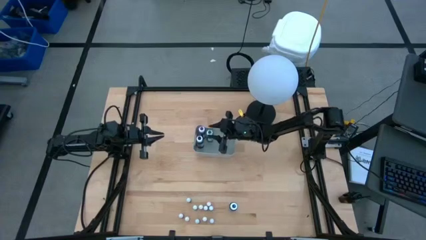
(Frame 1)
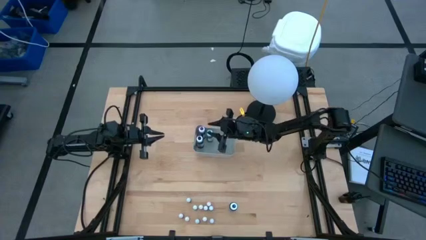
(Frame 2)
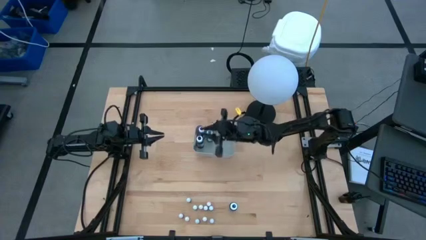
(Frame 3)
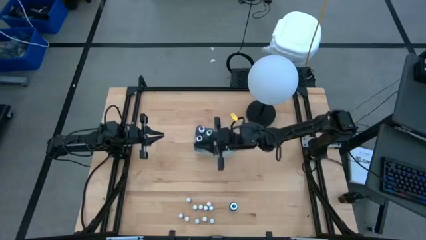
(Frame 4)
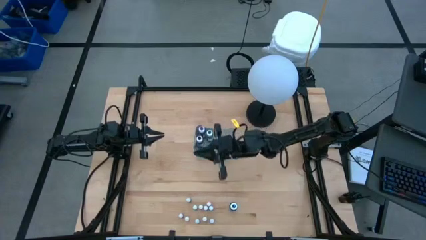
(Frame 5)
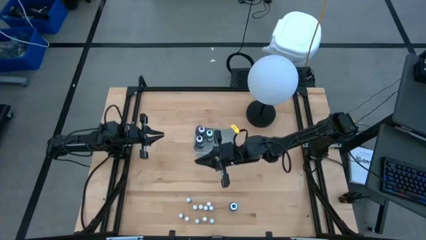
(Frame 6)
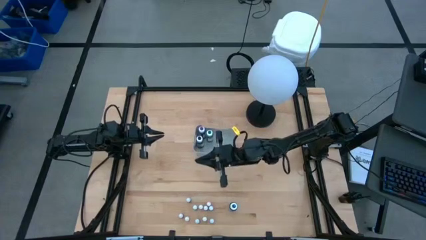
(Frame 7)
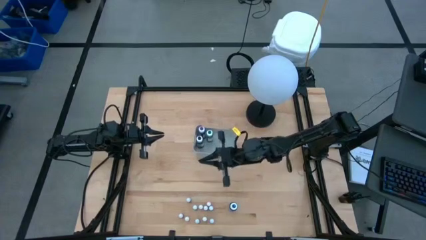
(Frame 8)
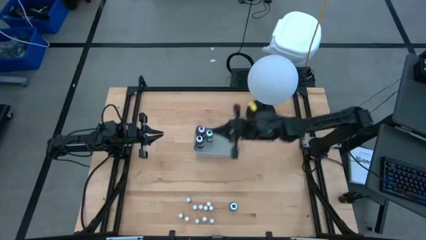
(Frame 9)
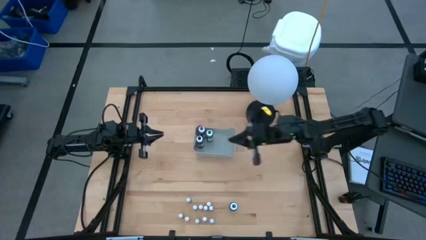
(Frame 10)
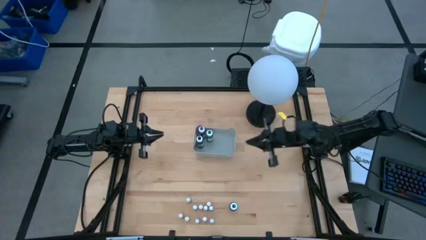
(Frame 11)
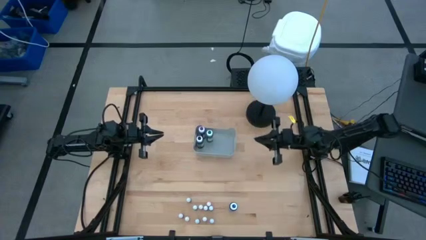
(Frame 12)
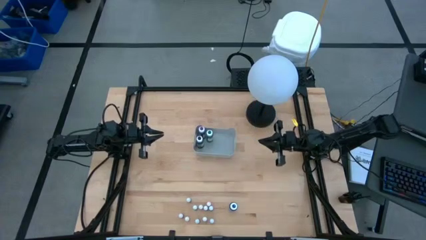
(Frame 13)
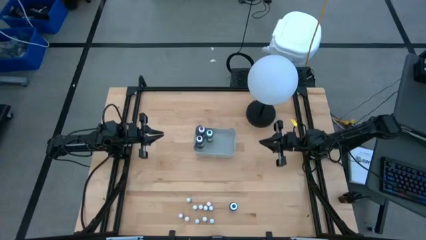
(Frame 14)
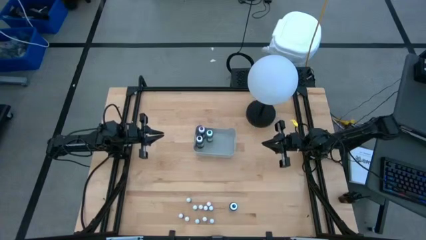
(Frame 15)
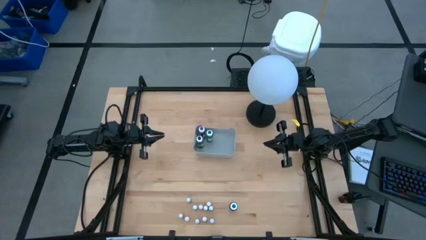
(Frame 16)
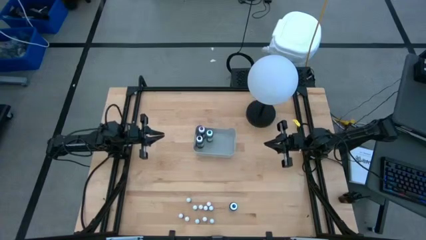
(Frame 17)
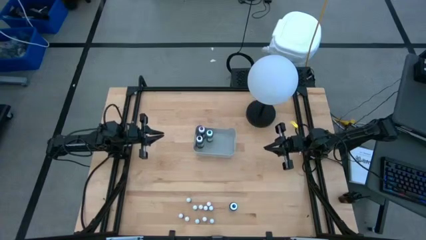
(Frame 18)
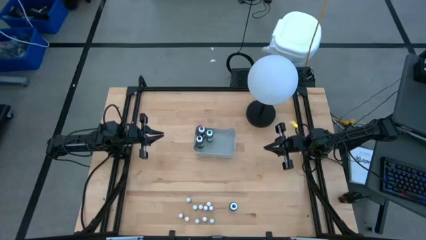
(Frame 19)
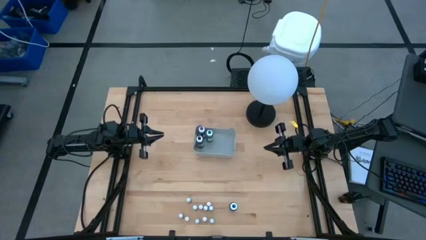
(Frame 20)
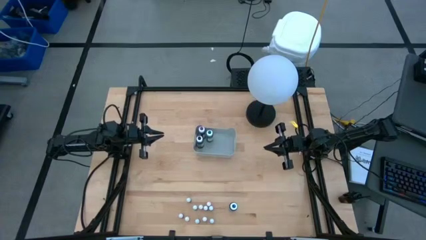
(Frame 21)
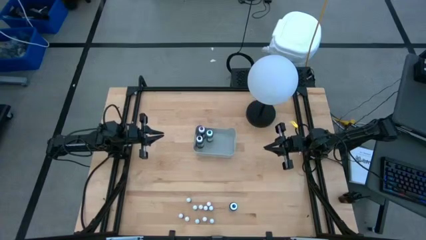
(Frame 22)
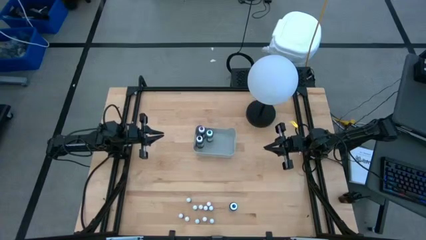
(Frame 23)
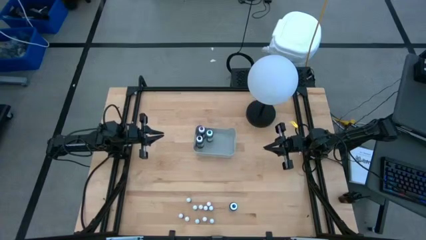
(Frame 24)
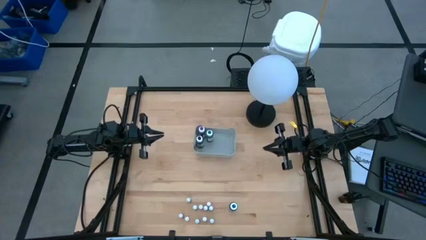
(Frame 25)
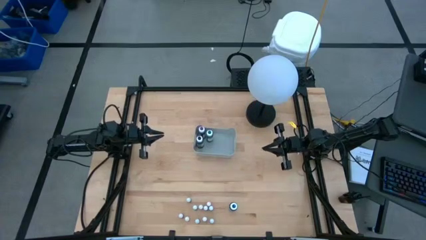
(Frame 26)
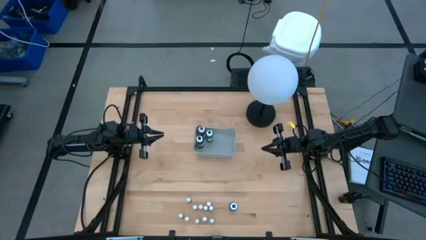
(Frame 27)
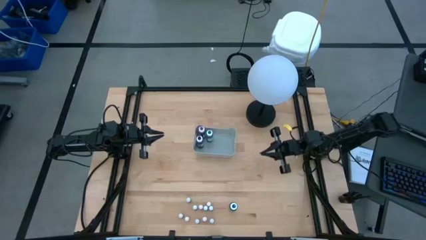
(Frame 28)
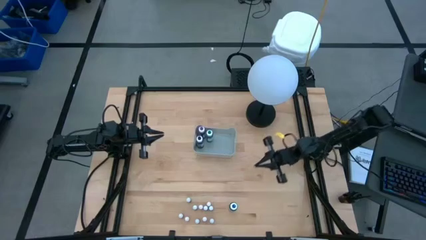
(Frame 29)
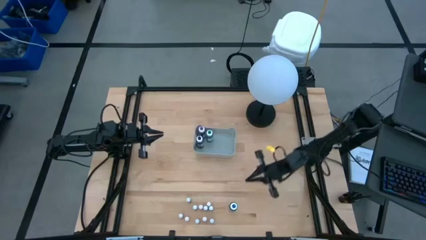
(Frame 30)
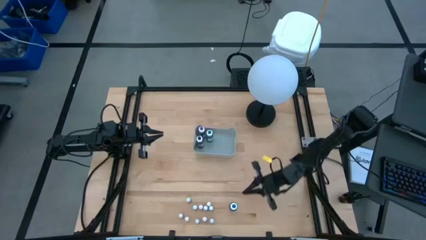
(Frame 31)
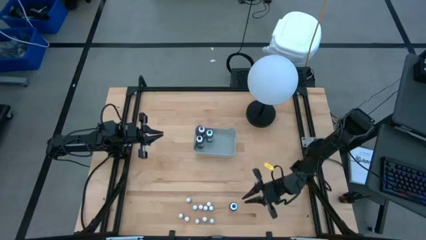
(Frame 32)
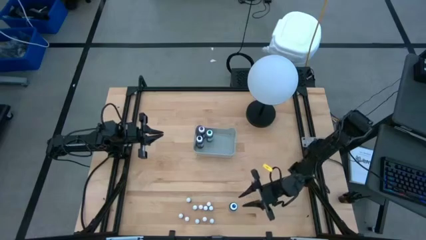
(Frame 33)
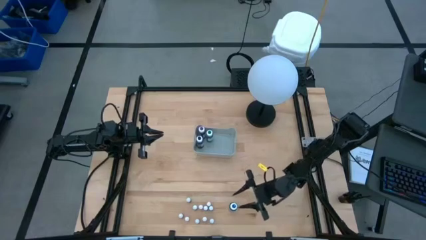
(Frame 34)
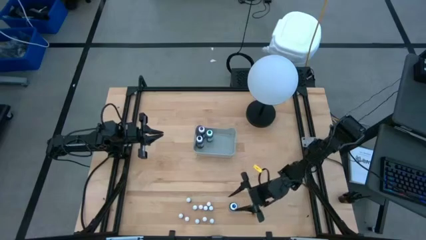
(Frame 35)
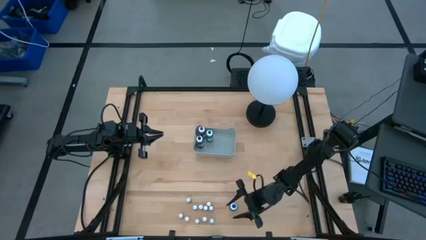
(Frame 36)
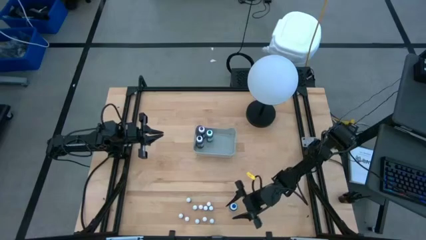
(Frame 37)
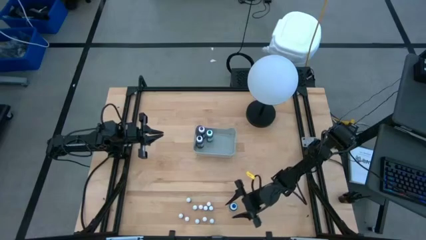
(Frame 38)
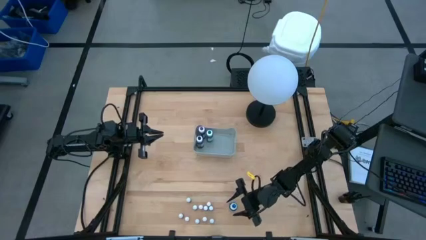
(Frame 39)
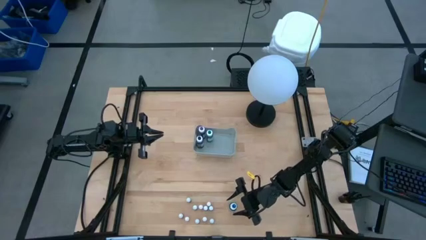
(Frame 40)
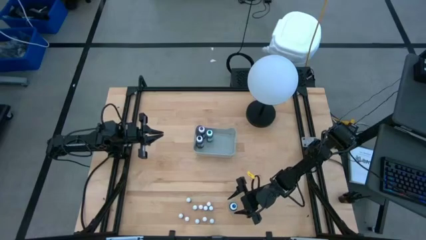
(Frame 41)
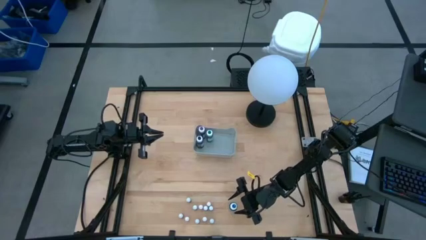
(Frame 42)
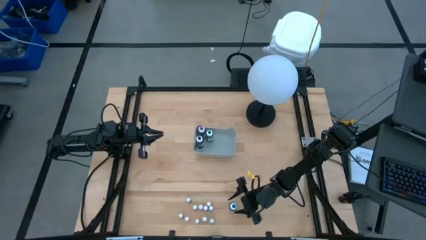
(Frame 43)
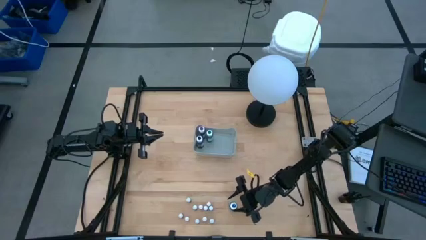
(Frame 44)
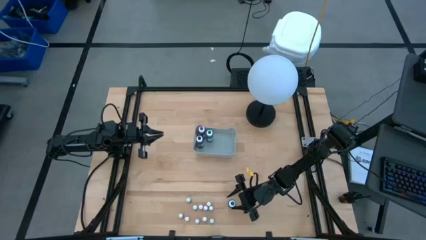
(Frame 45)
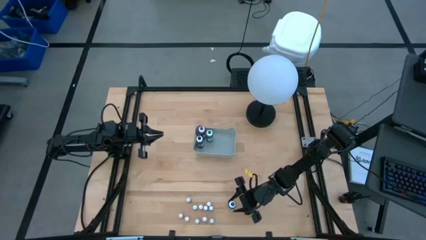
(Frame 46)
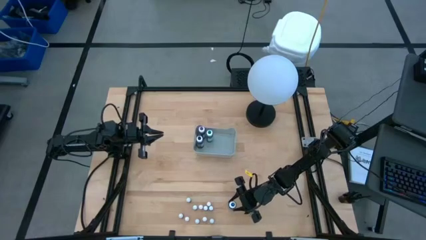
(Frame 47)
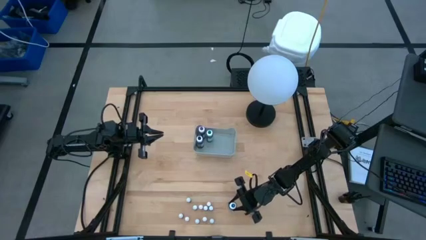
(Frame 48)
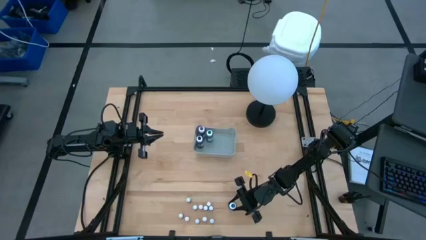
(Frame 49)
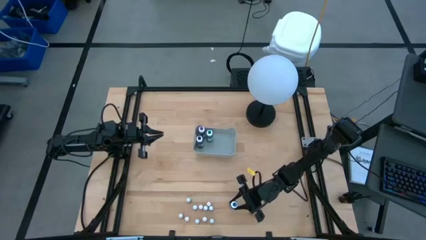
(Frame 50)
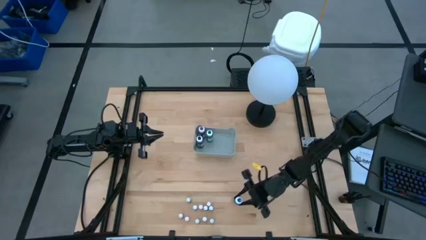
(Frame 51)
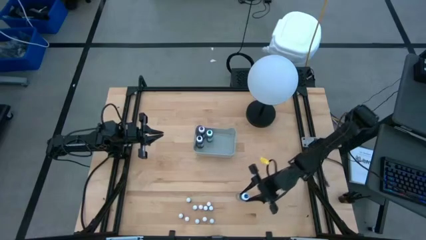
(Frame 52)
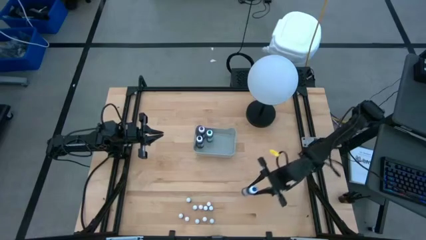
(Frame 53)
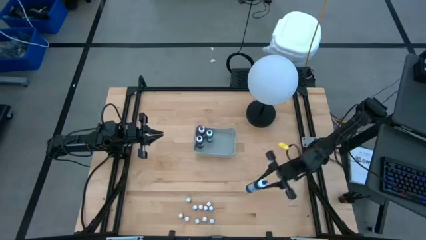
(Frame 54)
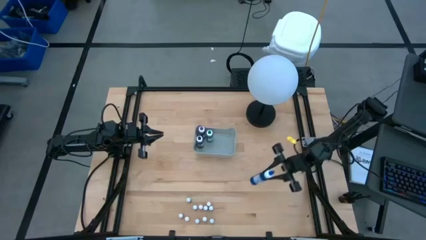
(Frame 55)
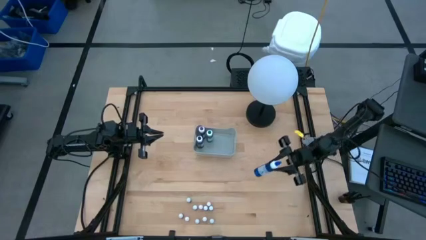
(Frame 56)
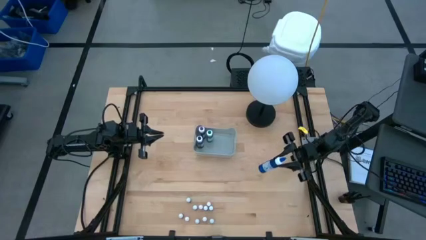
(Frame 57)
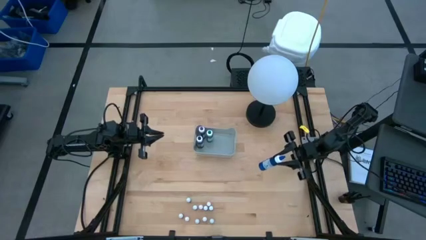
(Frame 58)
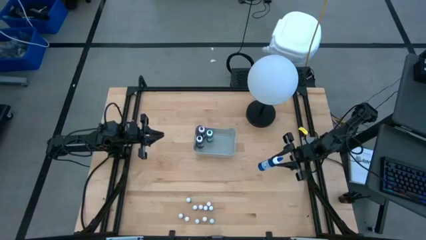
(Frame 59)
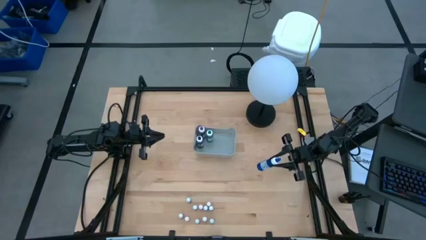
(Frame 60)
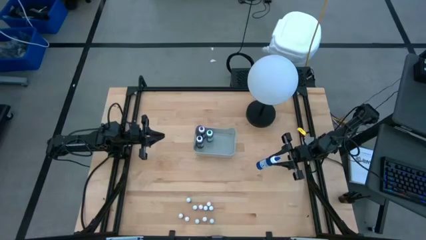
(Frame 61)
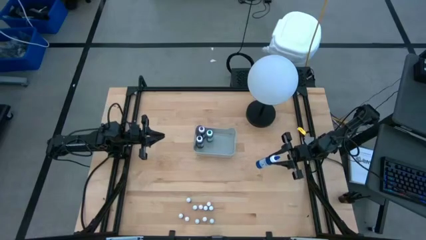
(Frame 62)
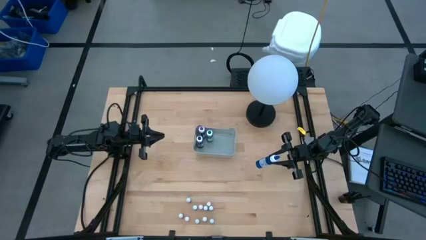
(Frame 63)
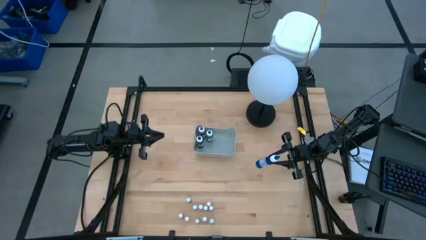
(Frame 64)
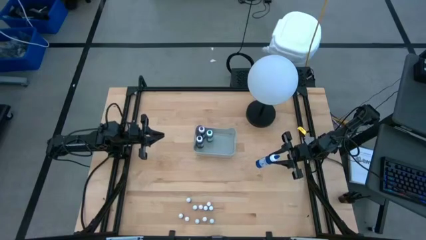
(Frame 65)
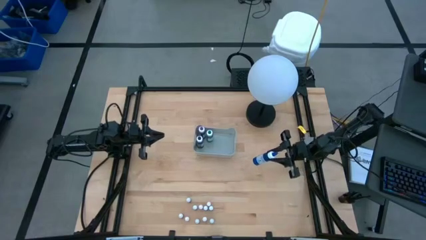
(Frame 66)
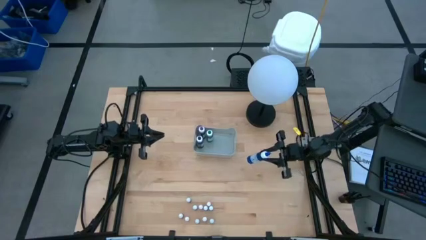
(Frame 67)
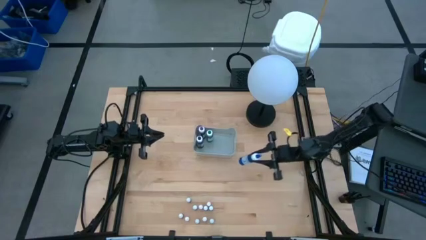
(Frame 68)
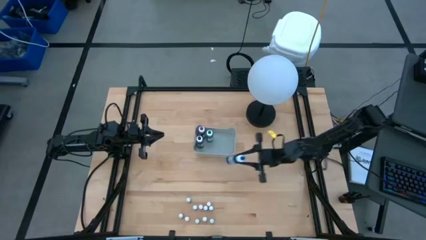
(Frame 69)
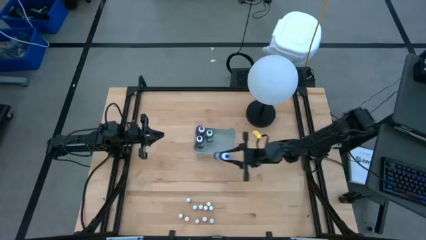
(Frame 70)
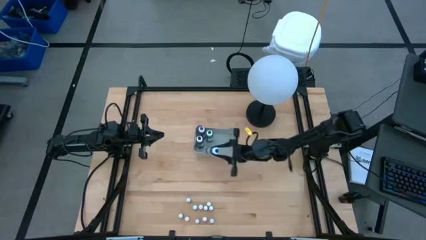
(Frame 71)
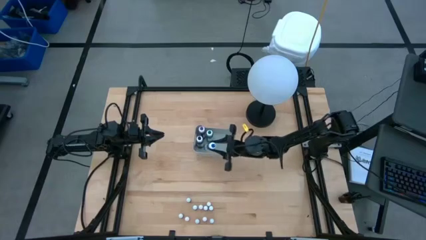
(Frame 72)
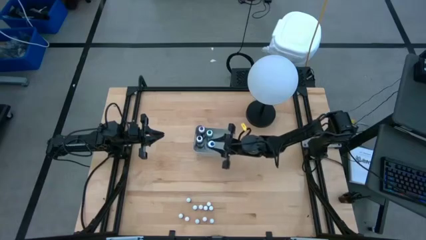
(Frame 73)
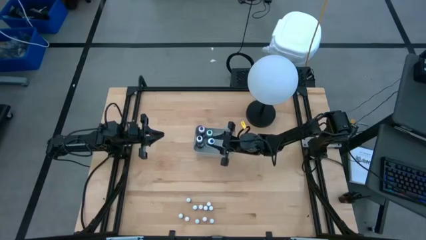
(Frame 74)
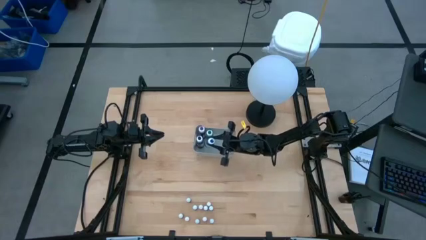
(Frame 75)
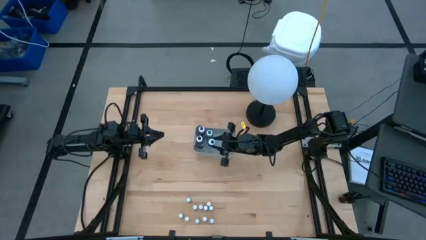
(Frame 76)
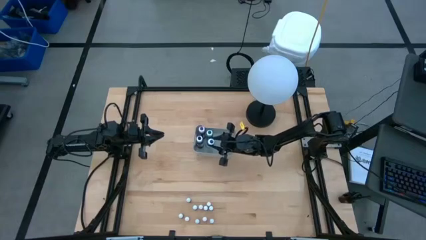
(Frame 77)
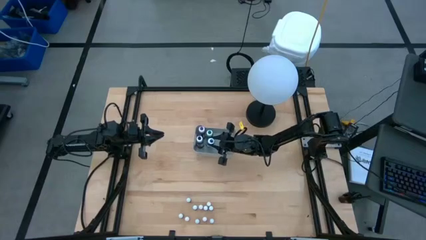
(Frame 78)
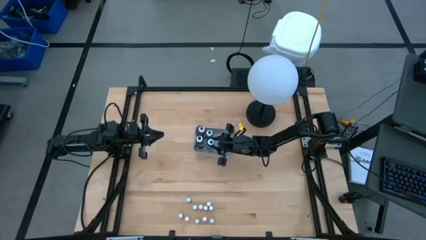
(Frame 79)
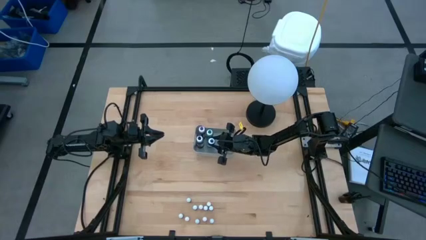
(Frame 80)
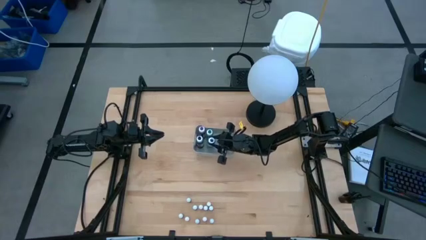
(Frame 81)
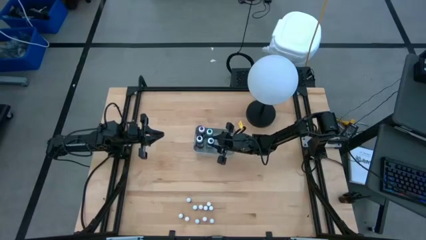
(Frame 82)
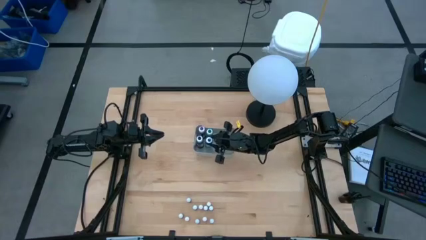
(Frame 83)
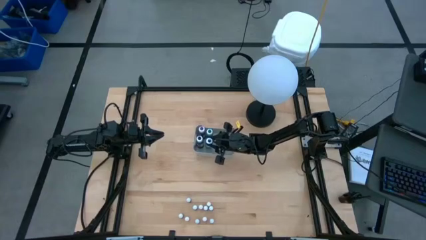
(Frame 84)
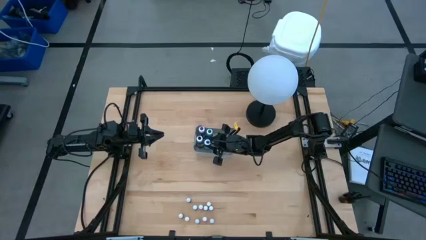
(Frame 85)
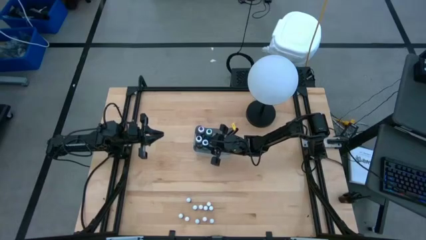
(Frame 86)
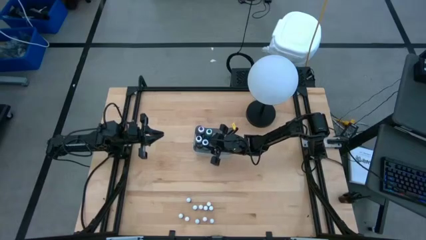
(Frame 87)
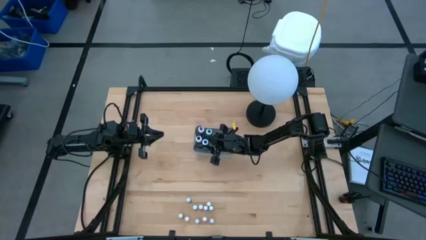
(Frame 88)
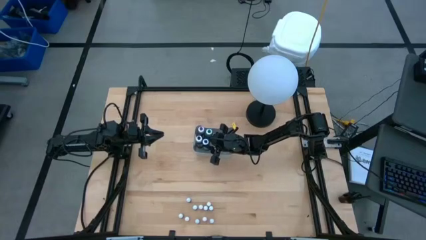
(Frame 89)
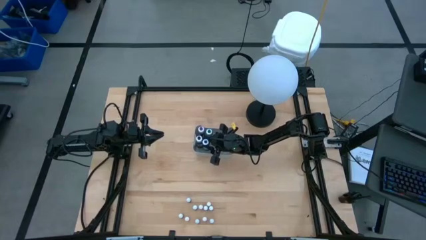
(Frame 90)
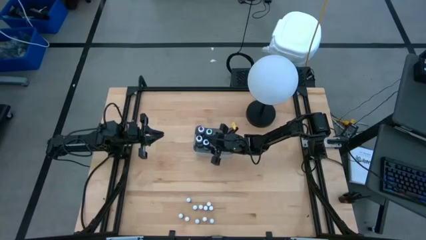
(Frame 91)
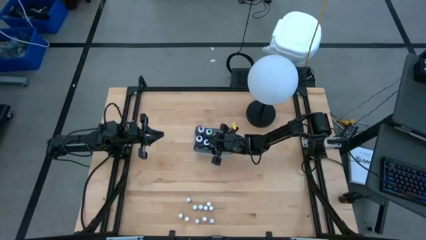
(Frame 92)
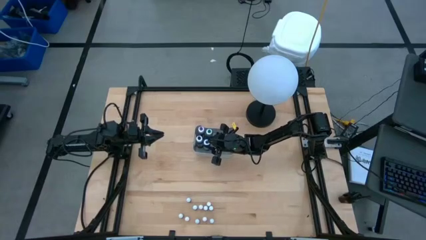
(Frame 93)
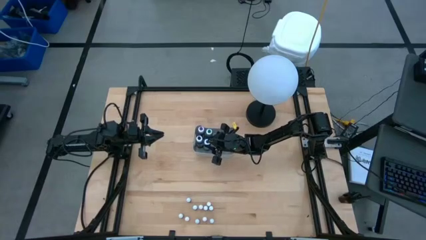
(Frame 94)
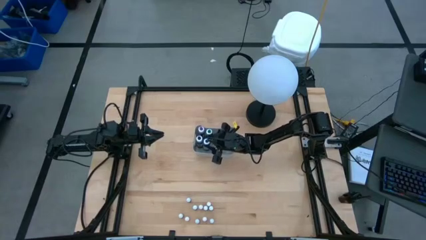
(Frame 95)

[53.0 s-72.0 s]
Task: Pick & Place food coloring
Put the large blue food coloring bottle into the gray bin
